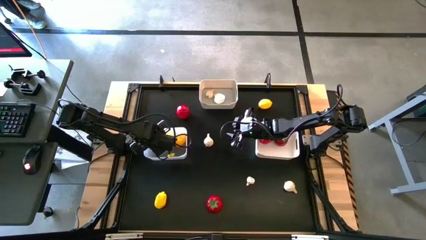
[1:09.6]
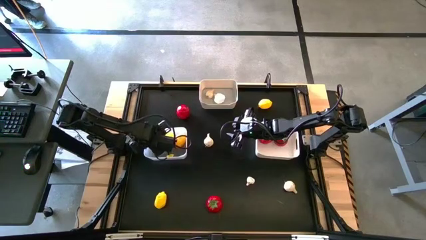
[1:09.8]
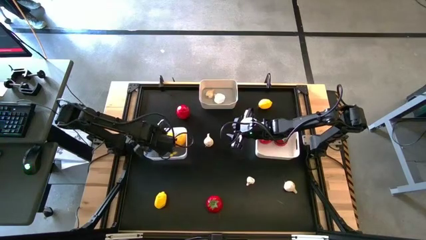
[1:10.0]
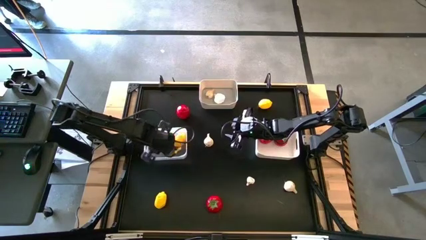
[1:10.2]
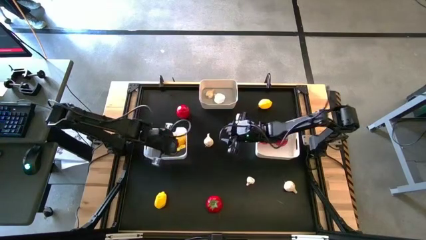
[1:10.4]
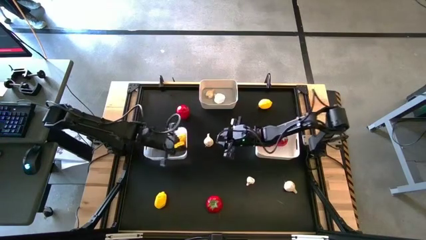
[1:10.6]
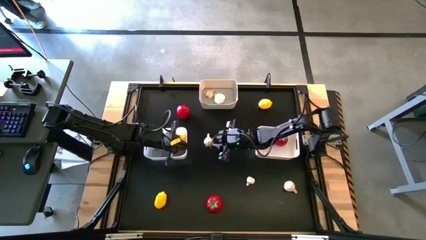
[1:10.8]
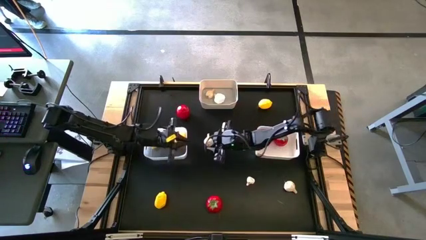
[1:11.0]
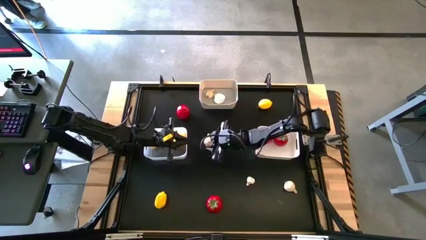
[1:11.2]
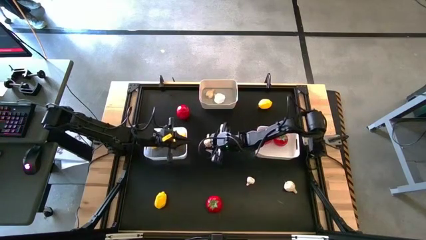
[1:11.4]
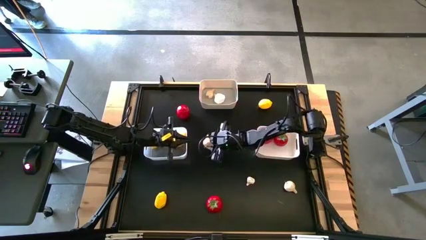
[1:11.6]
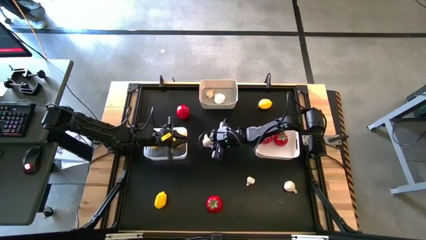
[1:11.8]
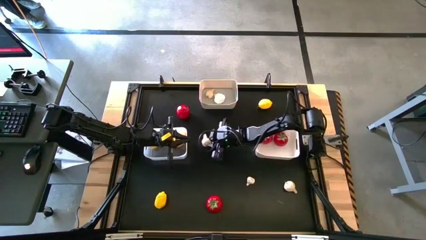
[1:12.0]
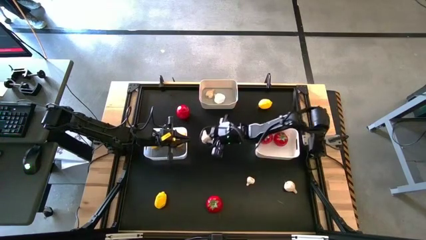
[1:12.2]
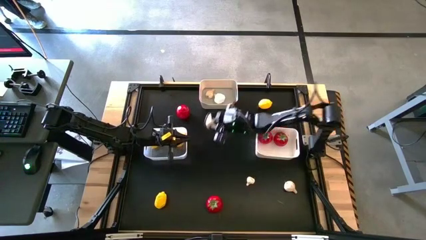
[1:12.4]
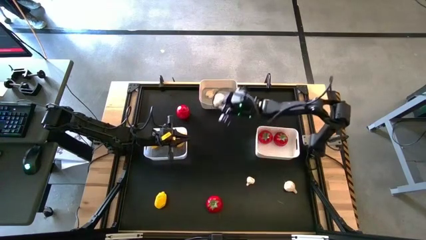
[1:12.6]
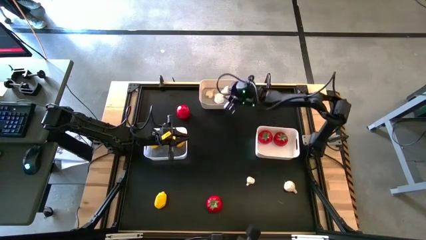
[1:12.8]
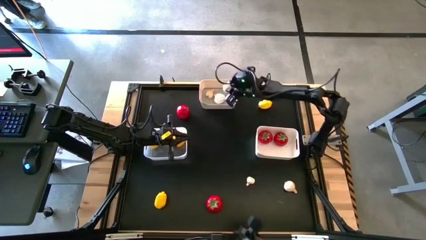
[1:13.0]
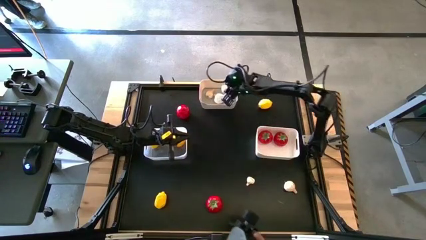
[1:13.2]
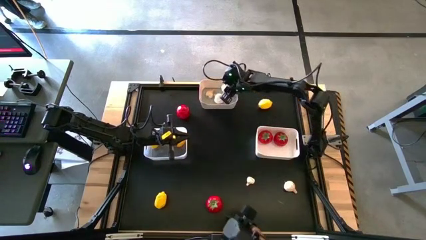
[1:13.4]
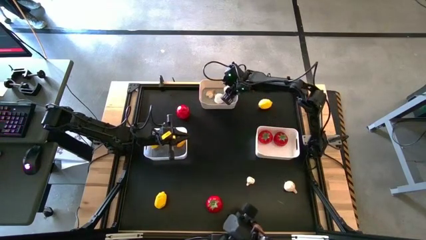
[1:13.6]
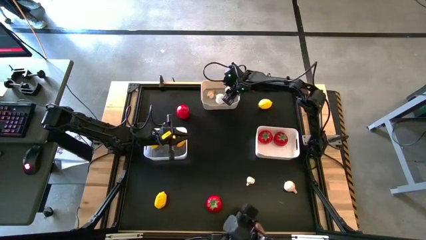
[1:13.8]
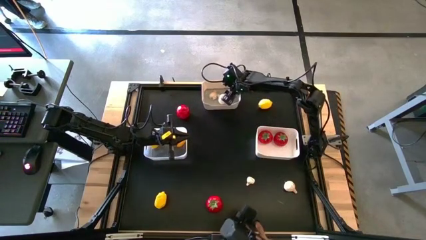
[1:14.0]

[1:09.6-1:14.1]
Task: Sort produce into baskets
Put the white garlic into the top left white bin

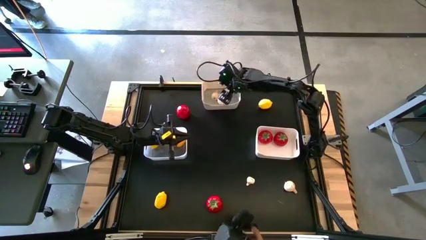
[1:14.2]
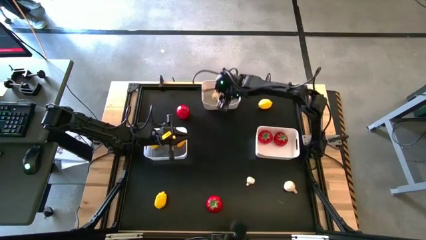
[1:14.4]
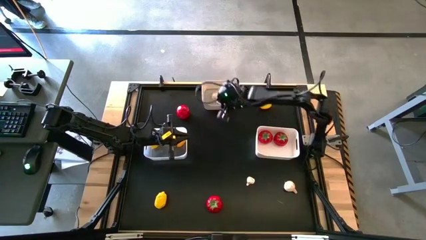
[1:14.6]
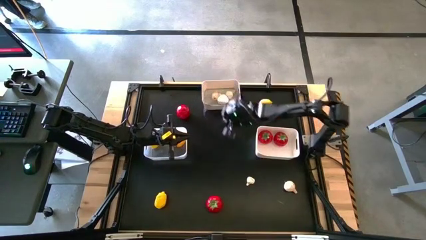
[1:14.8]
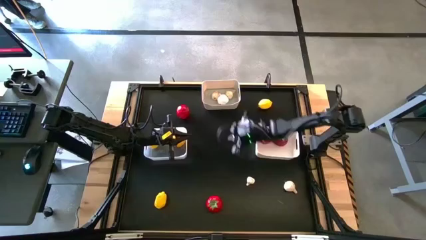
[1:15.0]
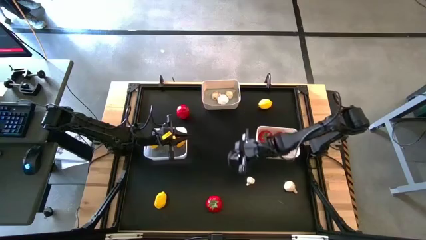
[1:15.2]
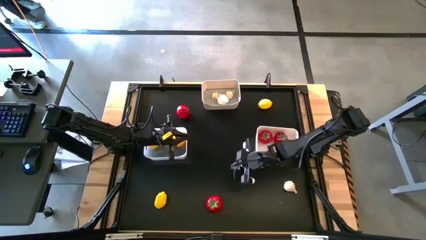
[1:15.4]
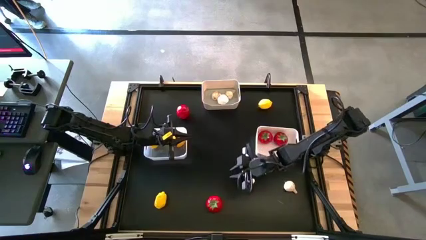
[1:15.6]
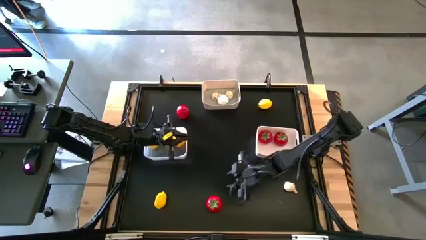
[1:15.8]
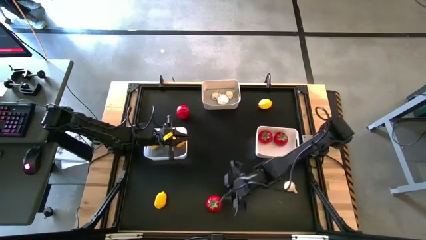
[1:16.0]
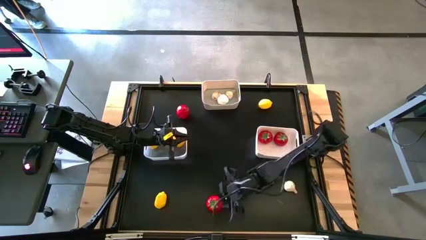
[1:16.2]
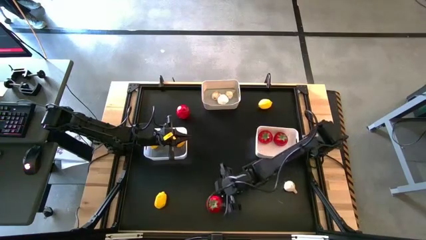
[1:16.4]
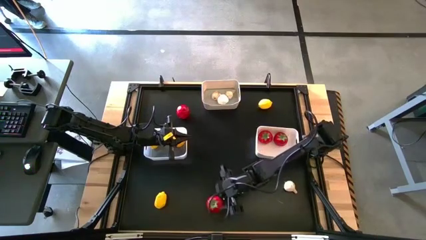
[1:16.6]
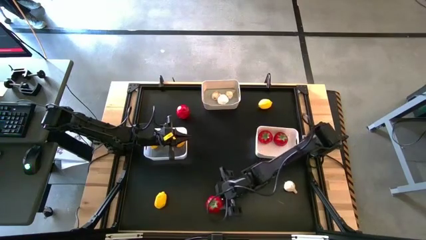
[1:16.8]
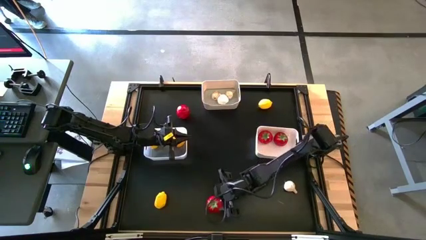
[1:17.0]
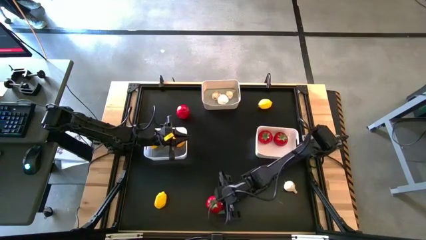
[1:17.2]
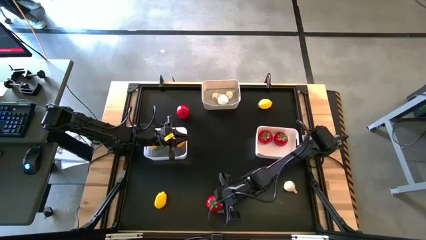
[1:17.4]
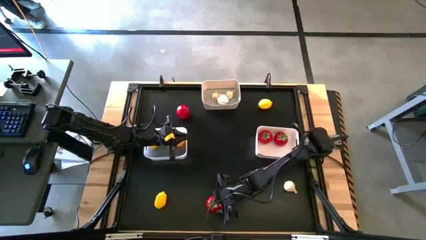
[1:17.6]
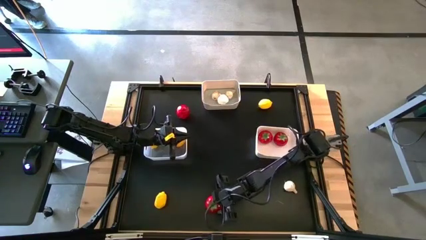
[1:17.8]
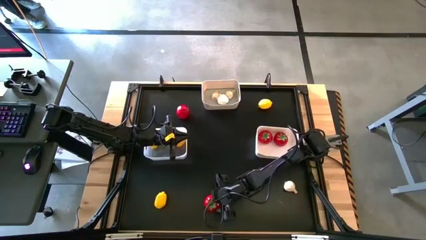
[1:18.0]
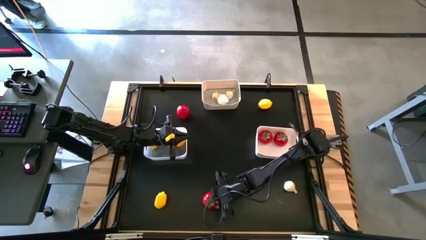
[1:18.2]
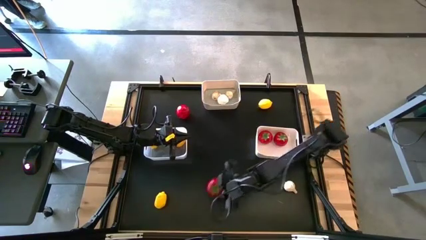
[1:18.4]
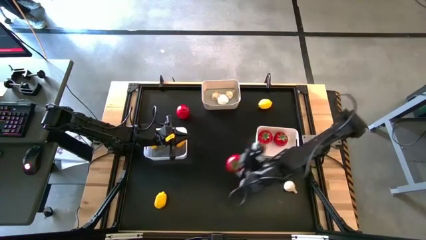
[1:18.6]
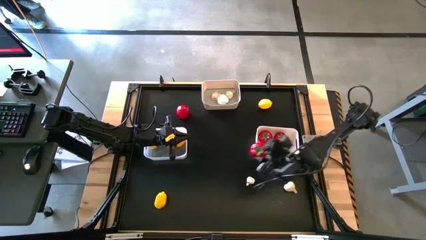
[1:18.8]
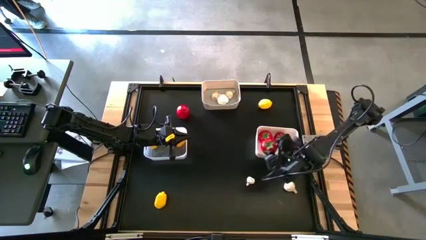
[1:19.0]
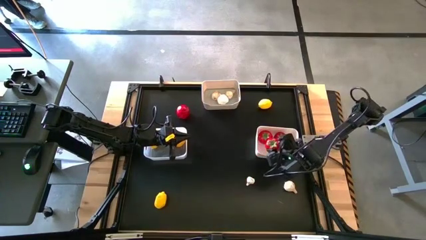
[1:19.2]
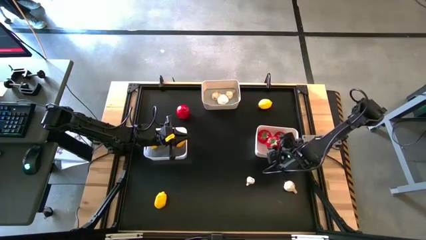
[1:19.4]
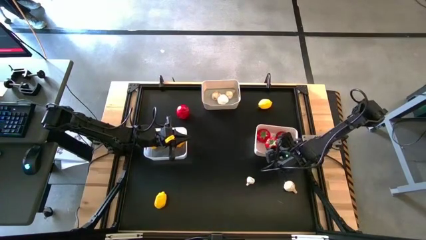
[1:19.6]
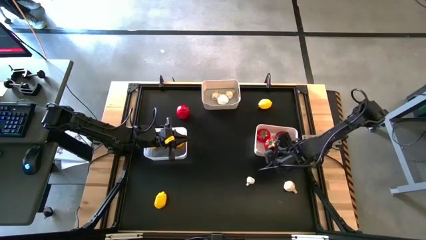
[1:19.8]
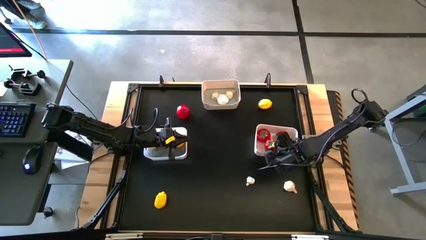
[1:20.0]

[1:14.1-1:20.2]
Put the red tomato into the bottom right white bin

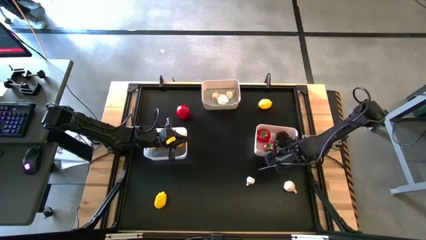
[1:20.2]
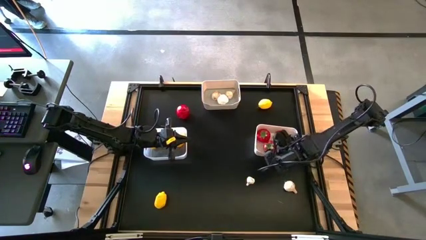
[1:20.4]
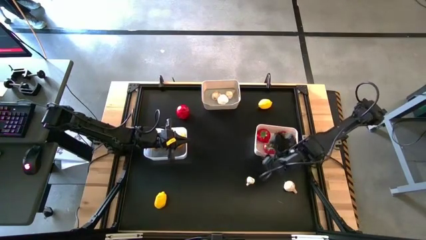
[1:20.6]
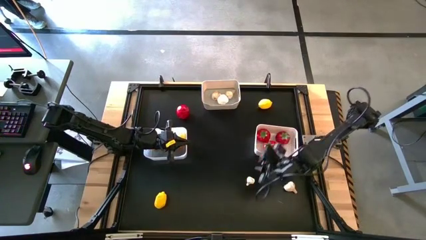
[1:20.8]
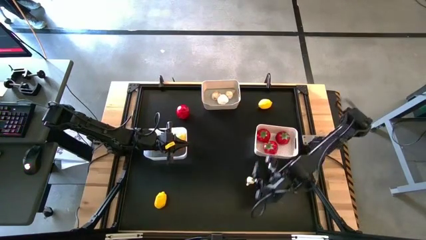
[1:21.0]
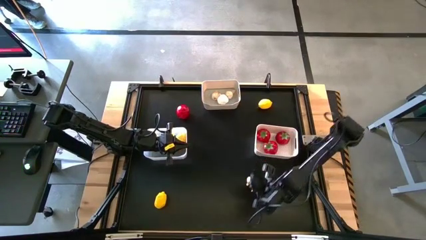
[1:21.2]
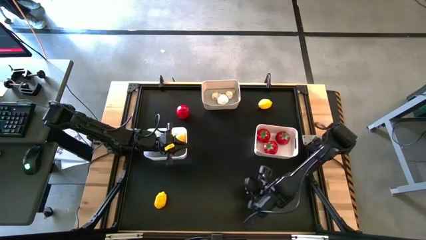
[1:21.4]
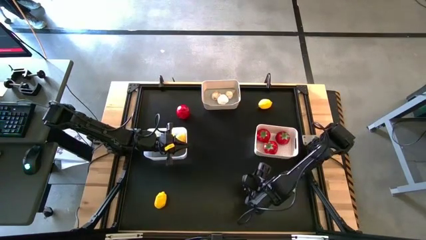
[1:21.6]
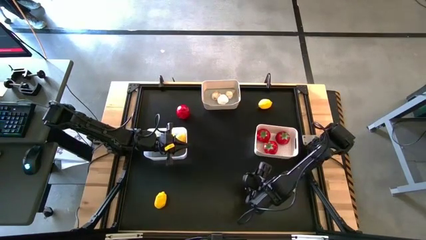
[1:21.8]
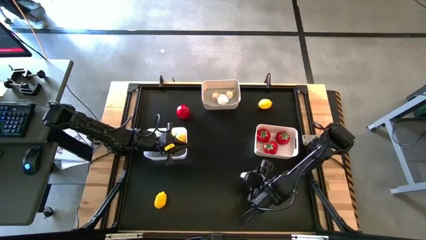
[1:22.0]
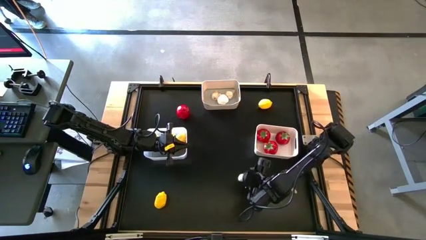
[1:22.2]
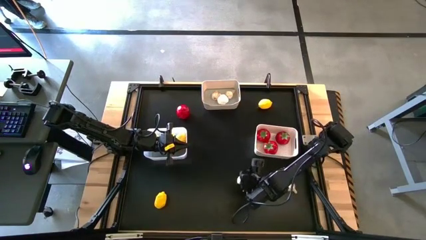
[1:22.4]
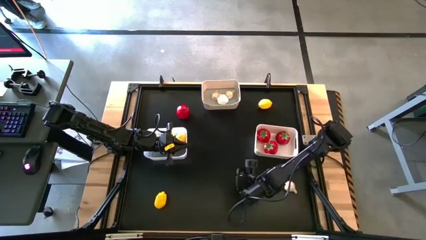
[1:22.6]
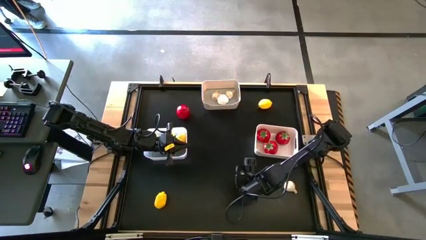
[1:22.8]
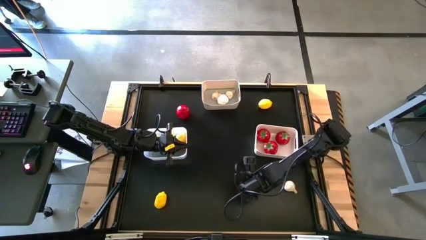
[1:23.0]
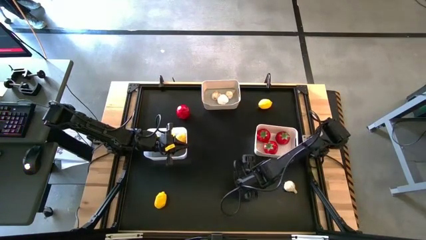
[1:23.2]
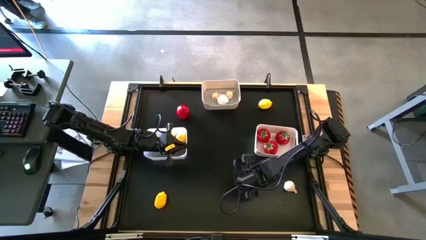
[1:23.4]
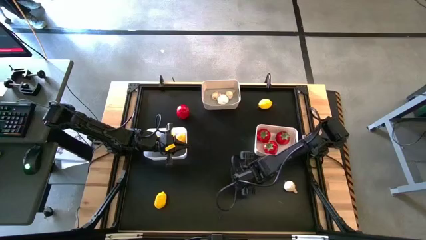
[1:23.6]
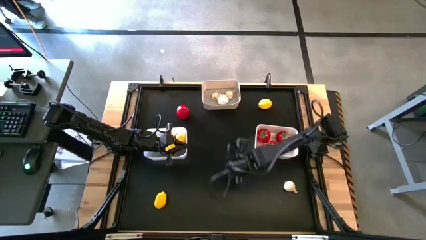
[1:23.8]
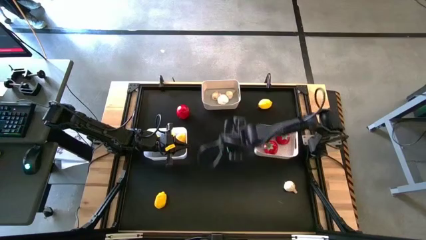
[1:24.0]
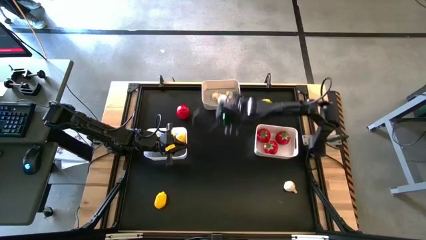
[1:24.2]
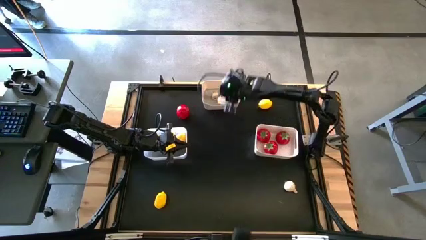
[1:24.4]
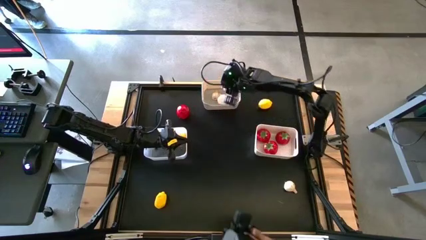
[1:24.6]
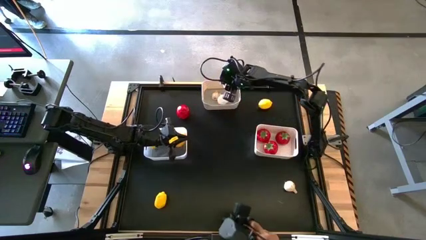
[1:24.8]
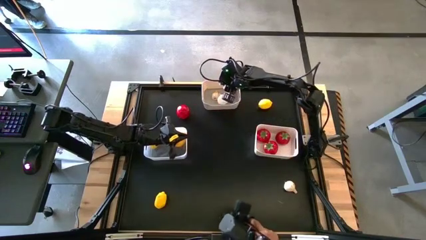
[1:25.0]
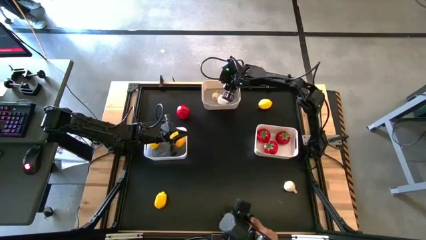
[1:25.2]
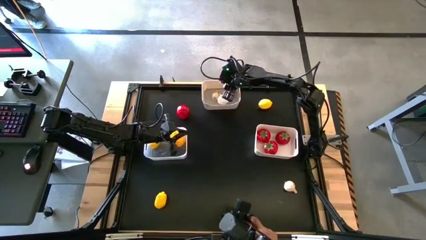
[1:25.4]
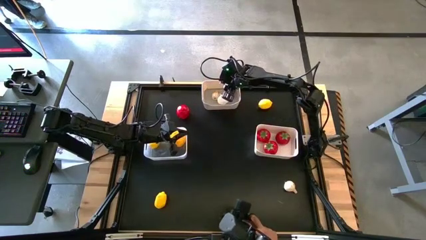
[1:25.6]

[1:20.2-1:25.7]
Put the white garlic into the top left white bin

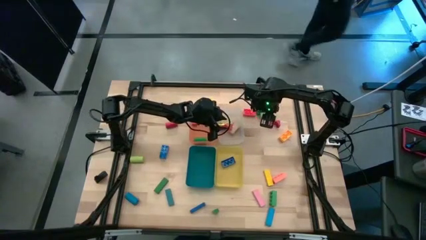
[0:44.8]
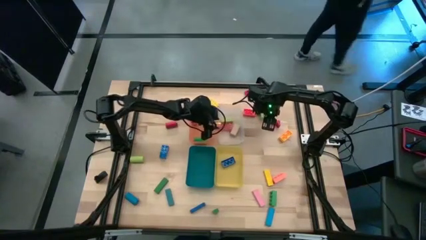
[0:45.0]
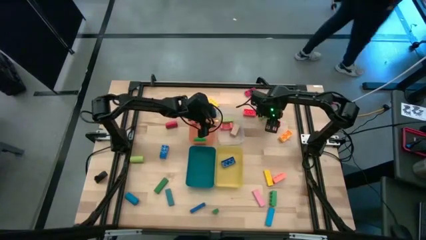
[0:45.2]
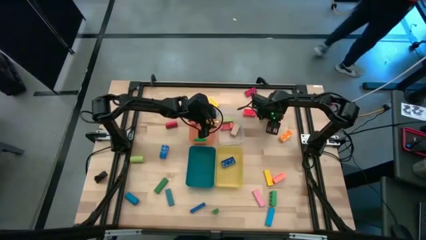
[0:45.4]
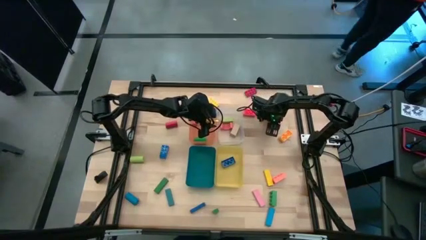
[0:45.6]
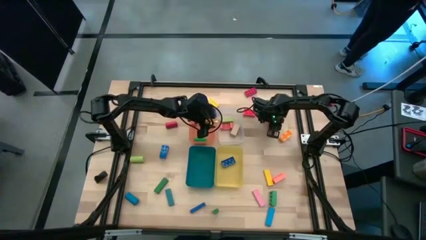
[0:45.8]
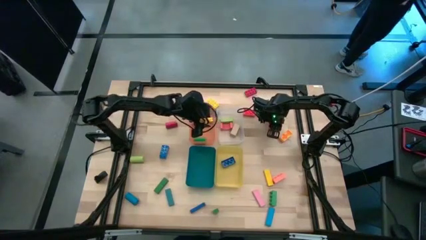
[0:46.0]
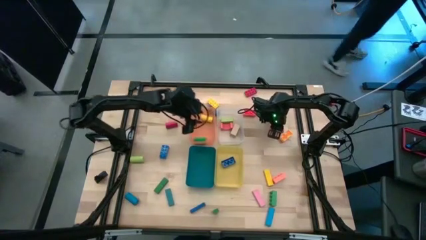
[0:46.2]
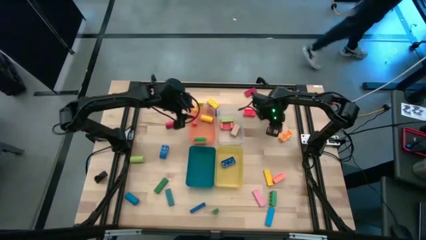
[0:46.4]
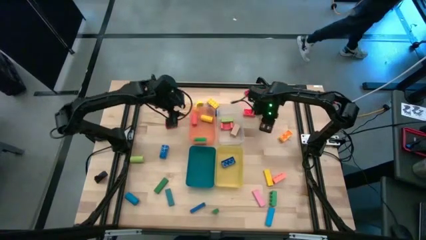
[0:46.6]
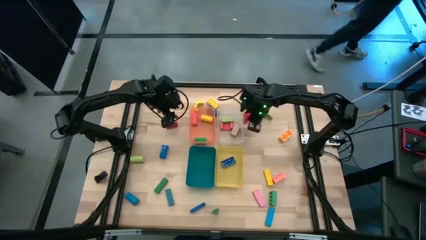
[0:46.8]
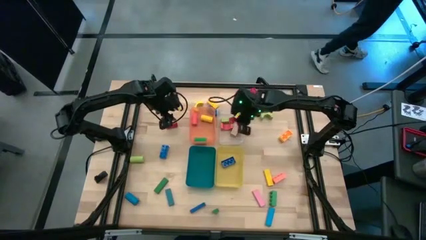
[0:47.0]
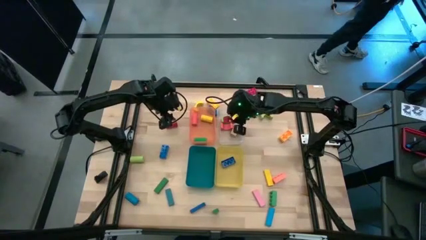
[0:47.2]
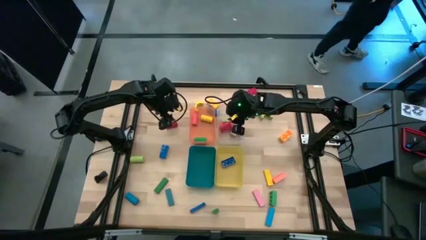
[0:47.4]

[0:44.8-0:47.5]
Task: Sort blocks by size
Put the red arch block into the transparent bin
